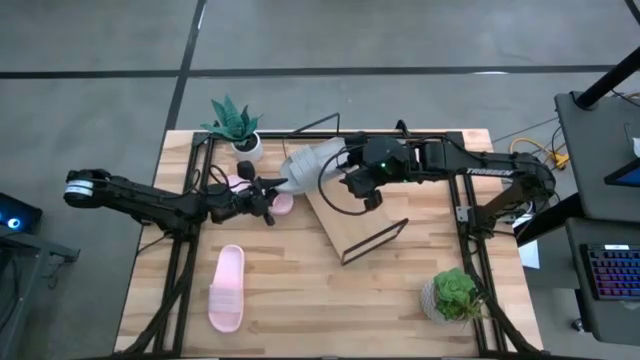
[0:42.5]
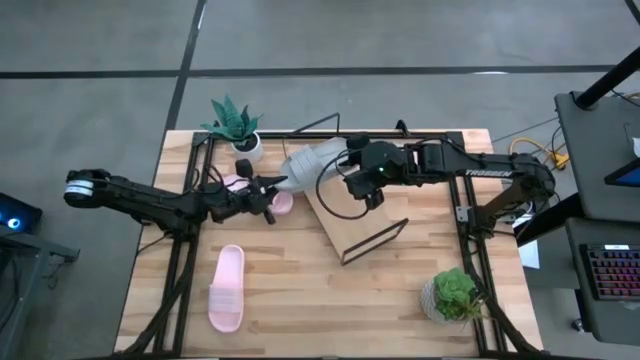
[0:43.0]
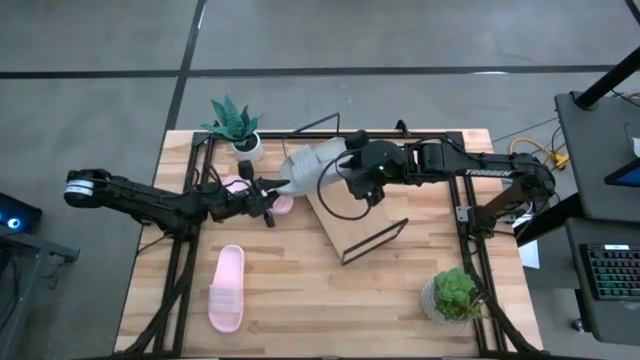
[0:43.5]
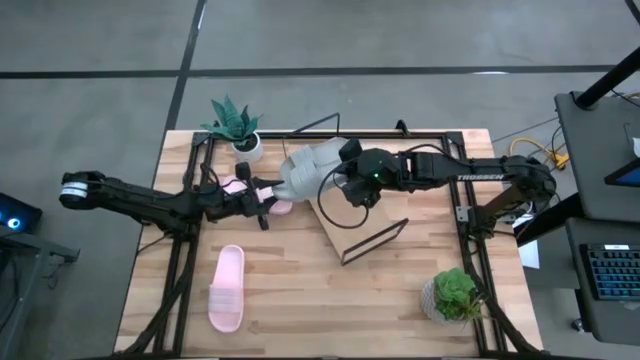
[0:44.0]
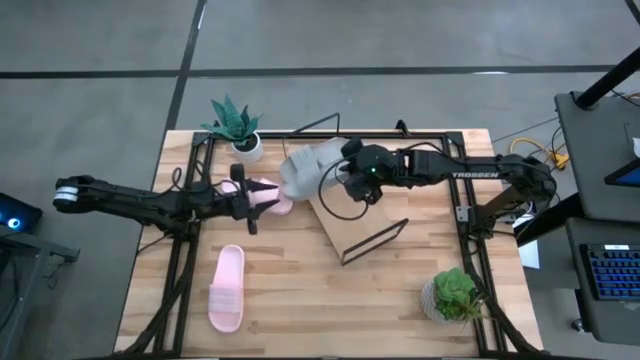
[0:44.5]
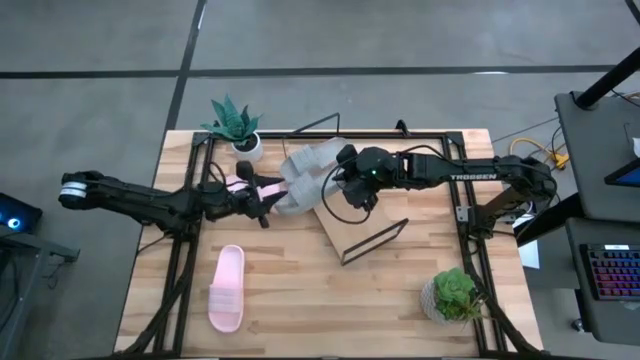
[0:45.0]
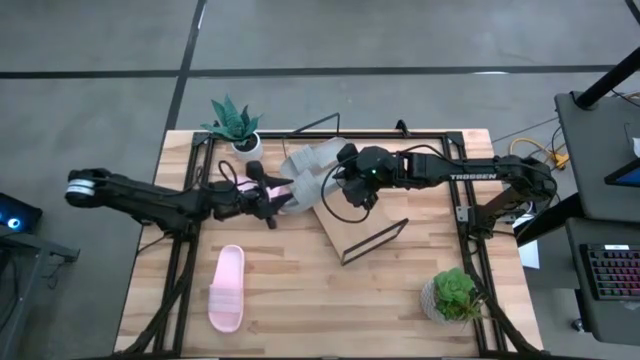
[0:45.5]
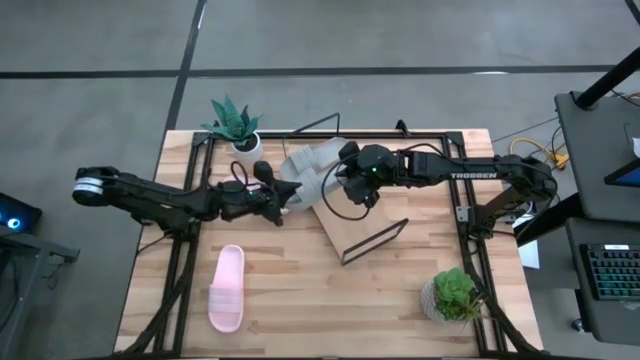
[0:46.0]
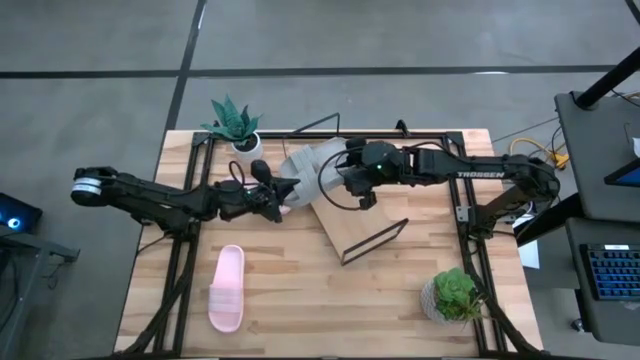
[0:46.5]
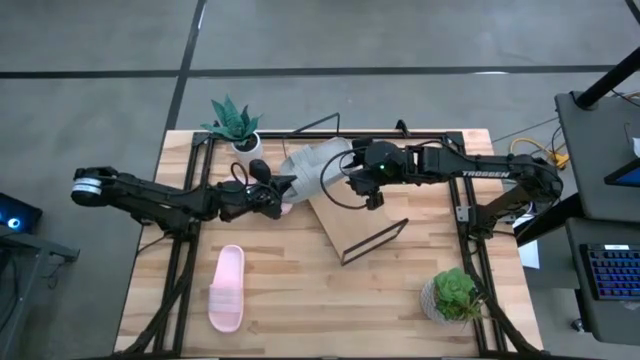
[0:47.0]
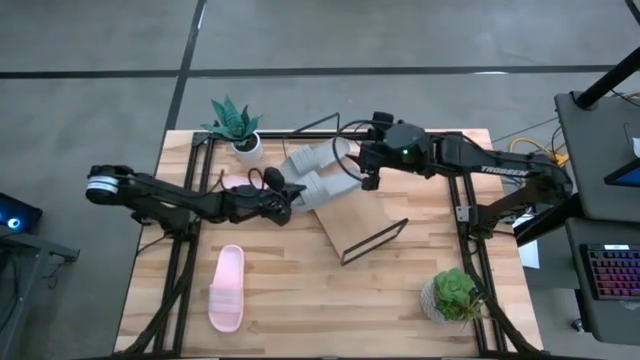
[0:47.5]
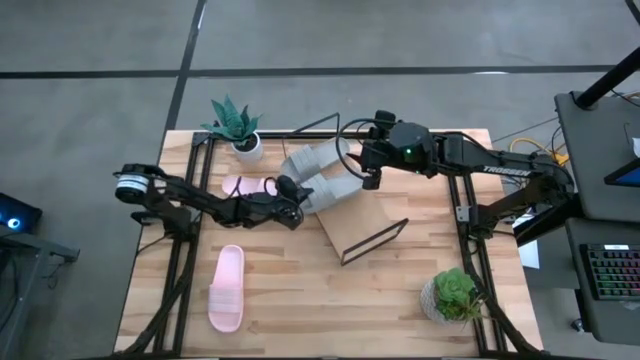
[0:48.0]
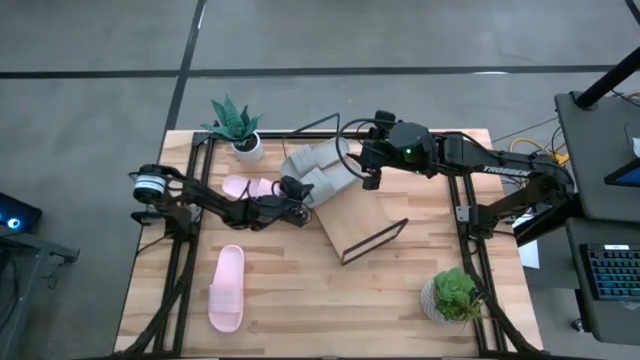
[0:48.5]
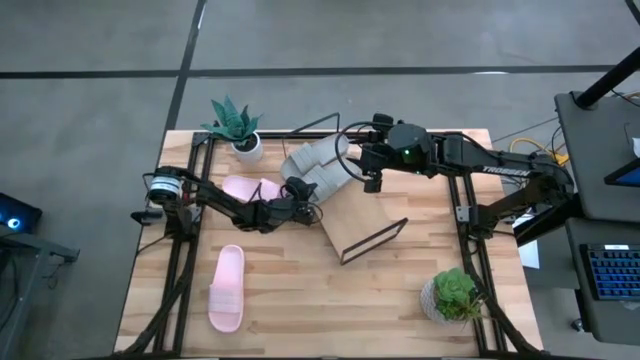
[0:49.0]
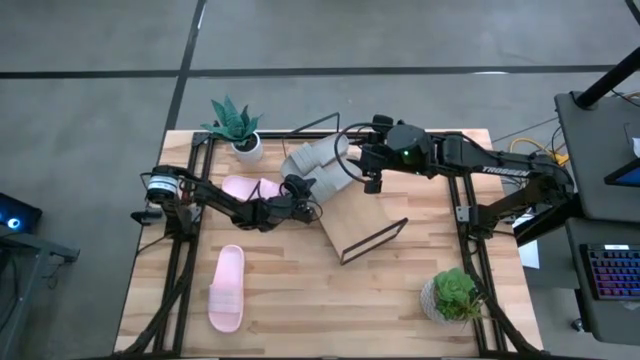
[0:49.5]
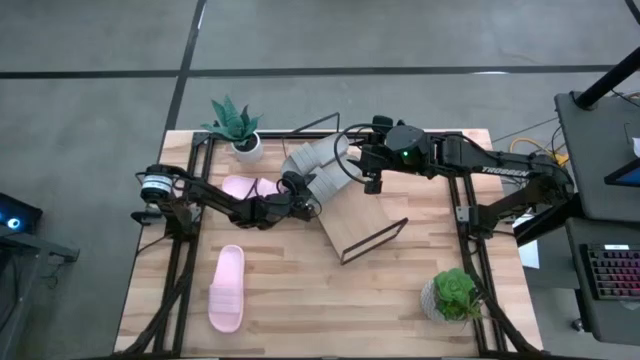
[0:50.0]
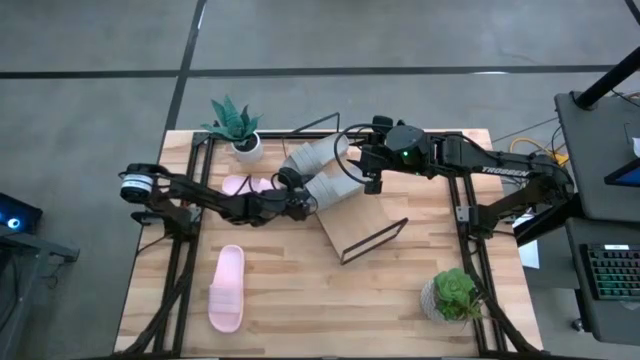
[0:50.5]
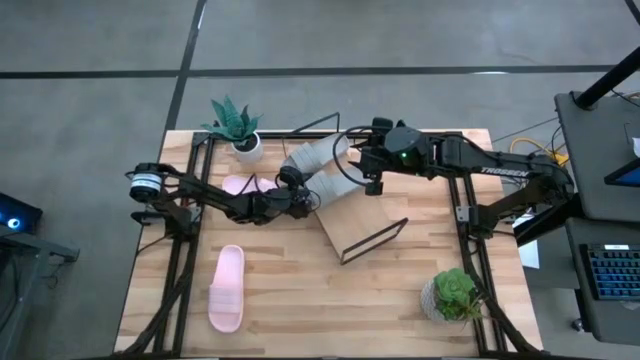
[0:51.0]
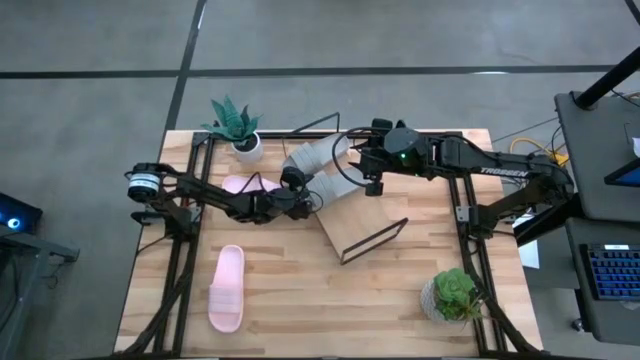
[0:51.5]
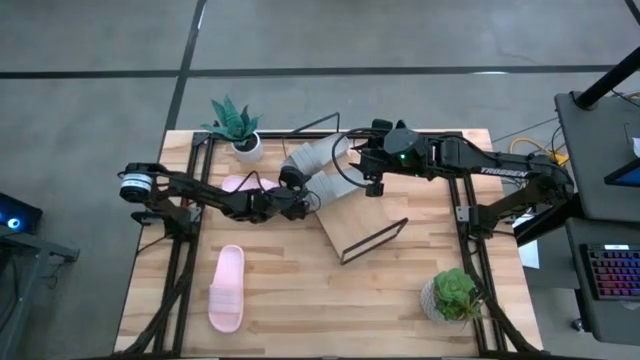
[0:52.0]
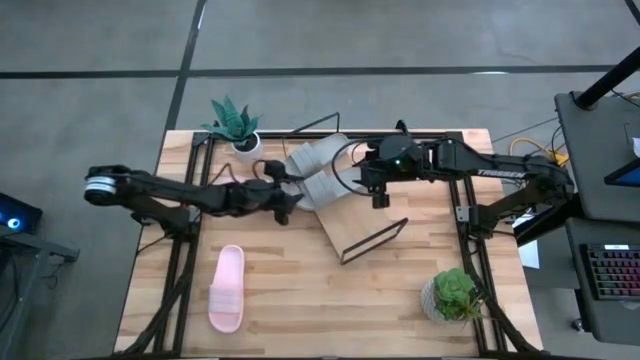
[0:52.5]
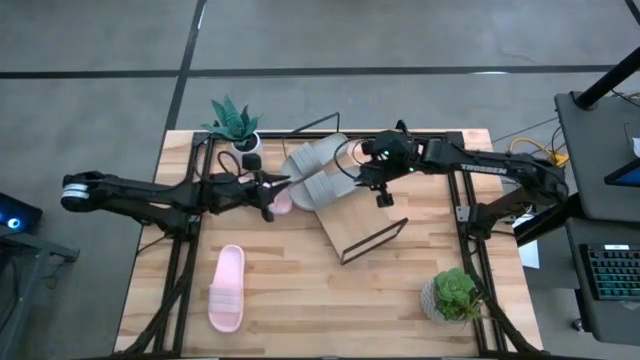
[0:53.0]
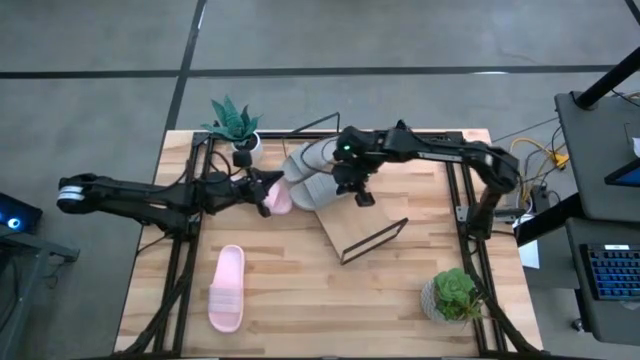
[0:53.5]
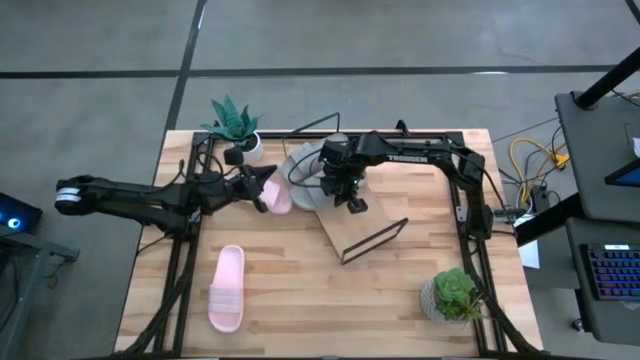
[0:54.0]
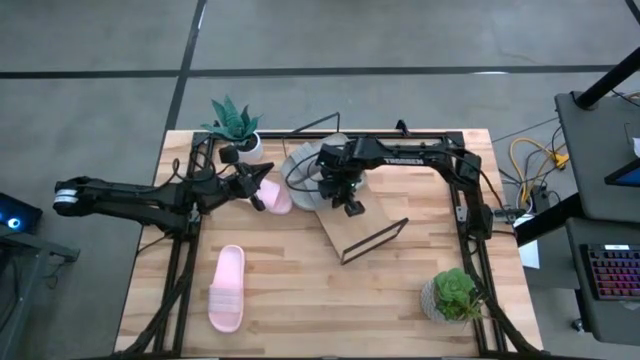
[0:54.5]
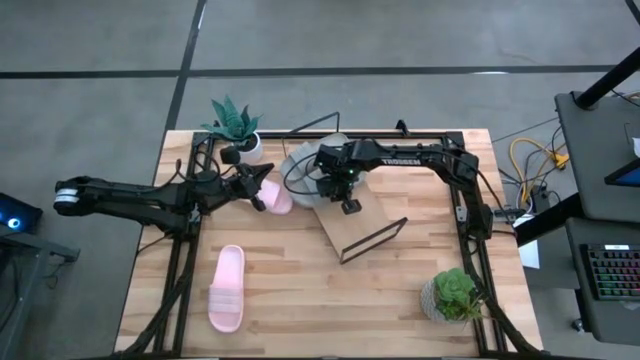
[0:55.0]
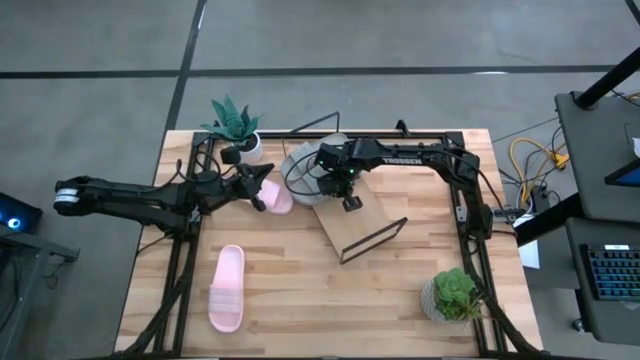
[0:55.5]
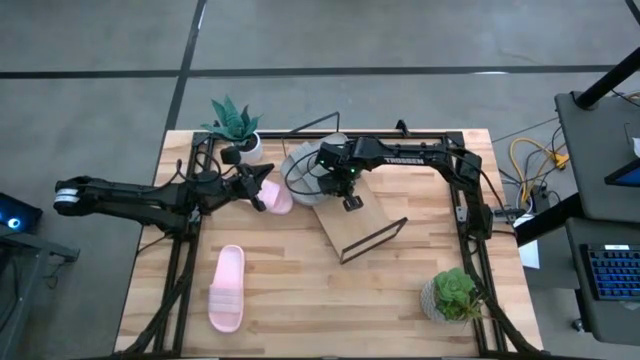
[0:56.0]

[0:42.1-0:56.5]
Task: Pick and place slides into the shelf
Put the gray slide on the shelf

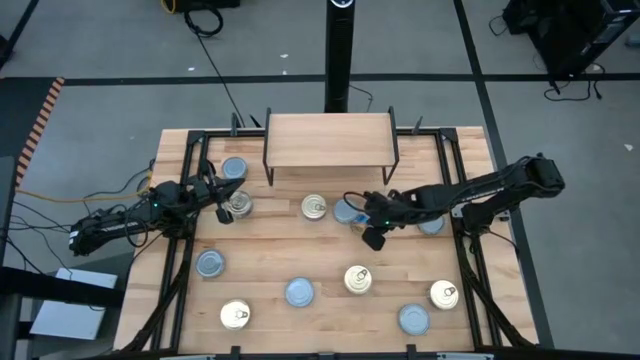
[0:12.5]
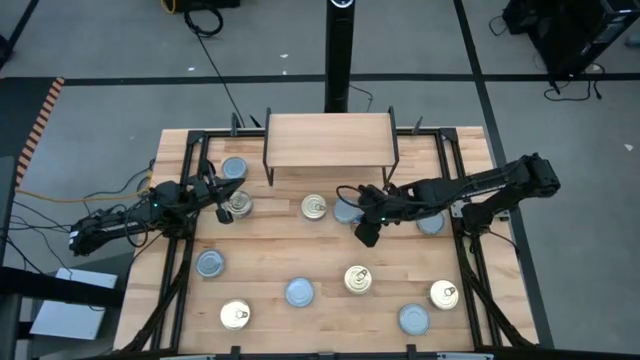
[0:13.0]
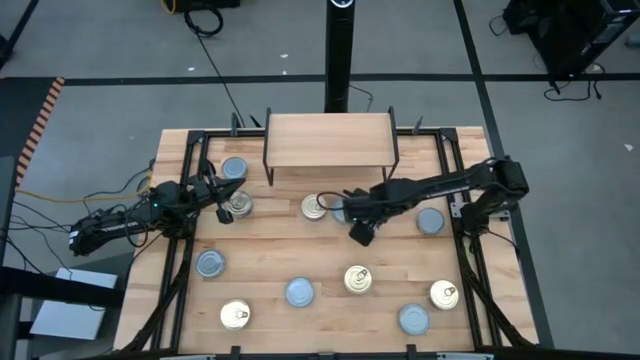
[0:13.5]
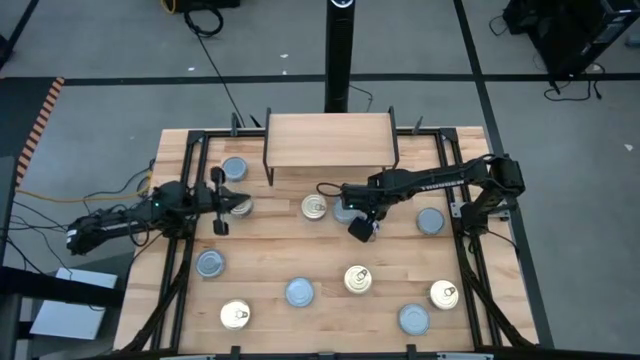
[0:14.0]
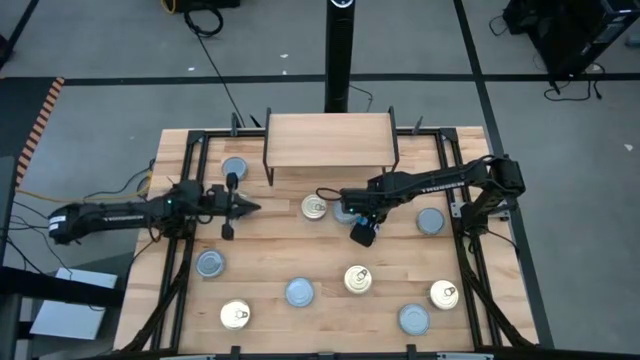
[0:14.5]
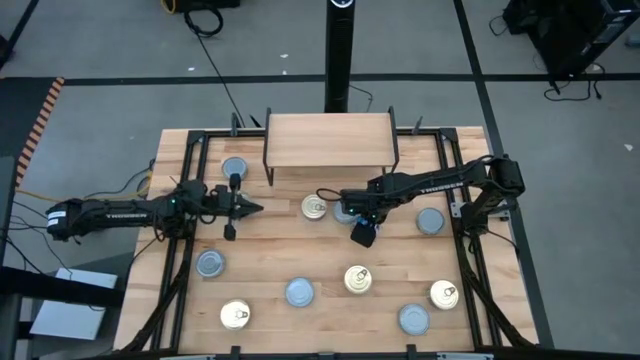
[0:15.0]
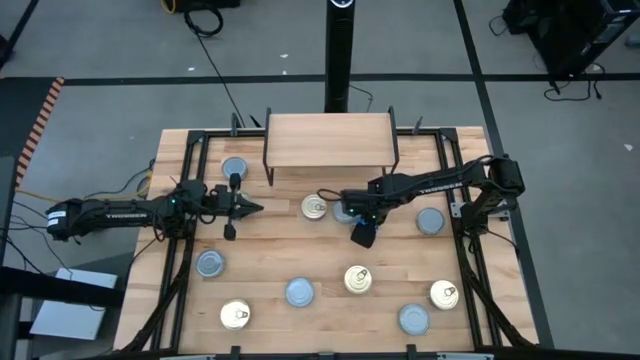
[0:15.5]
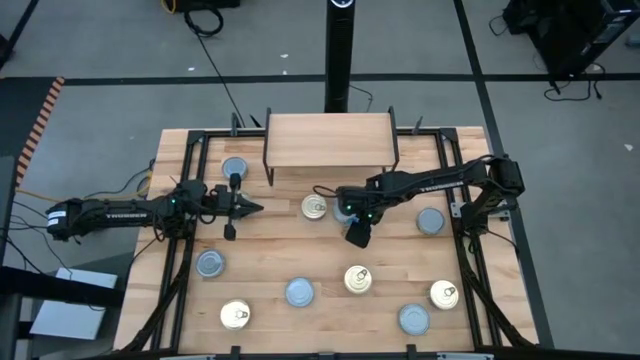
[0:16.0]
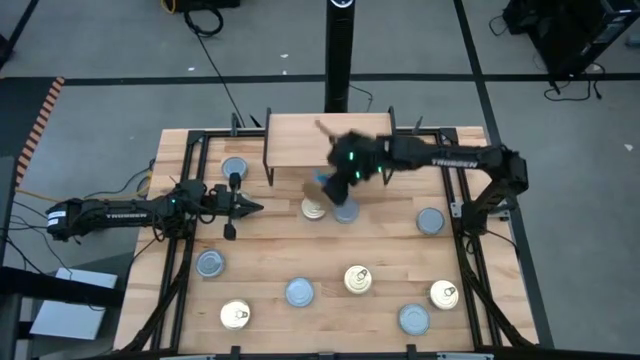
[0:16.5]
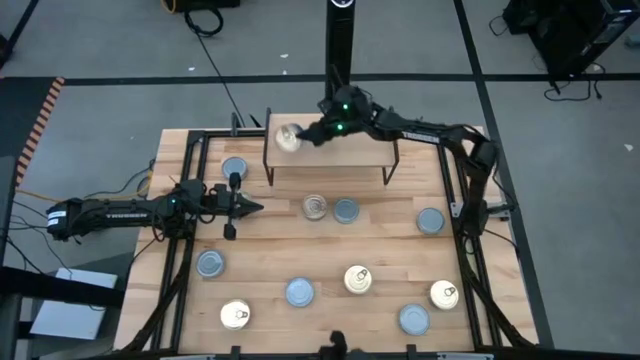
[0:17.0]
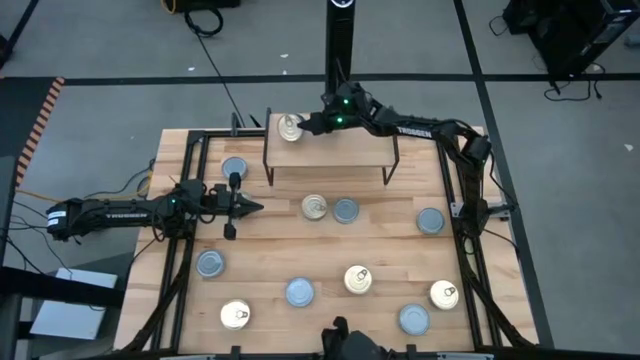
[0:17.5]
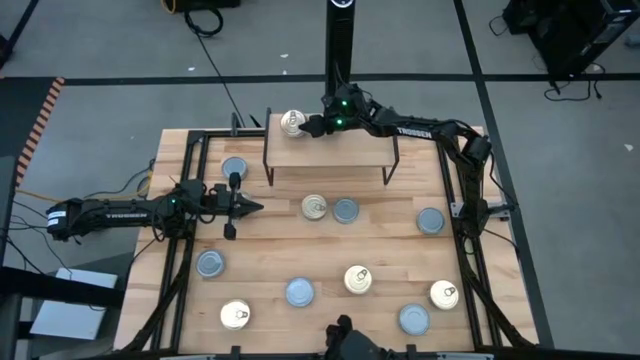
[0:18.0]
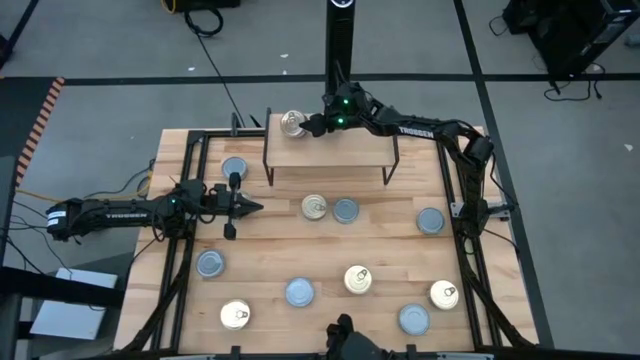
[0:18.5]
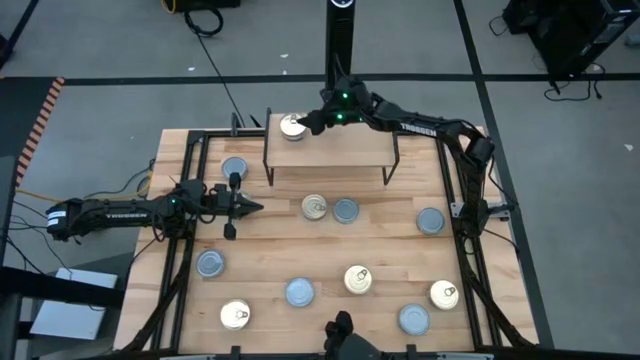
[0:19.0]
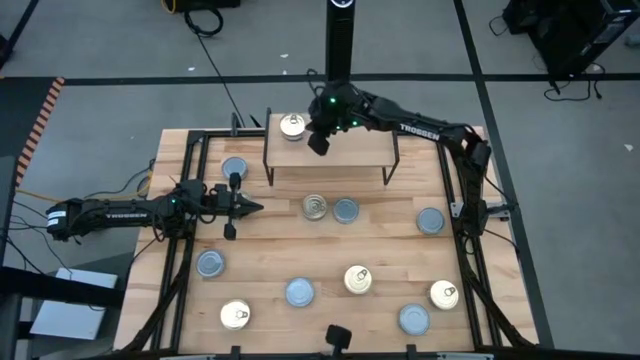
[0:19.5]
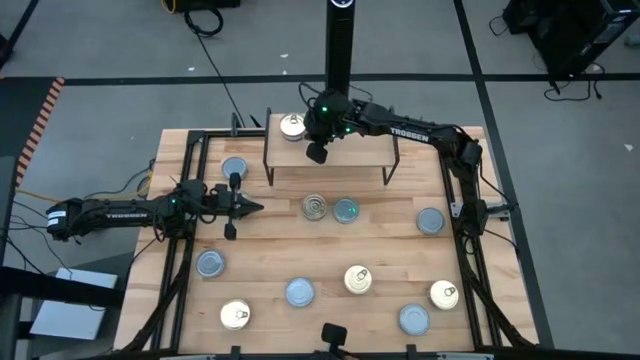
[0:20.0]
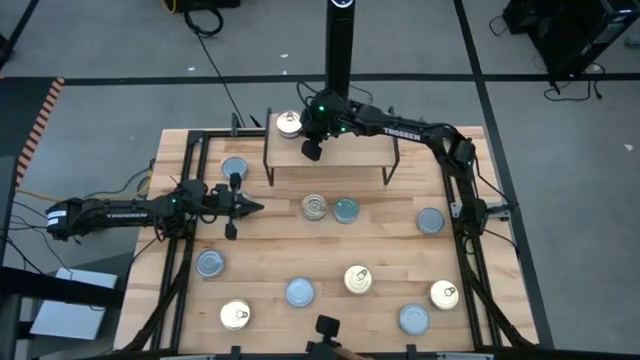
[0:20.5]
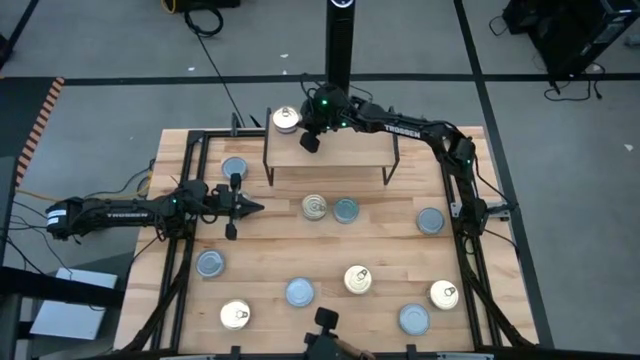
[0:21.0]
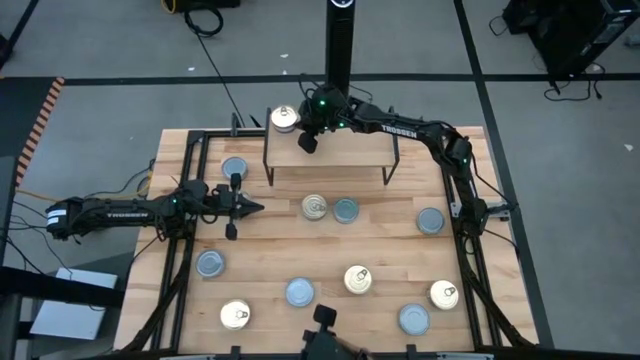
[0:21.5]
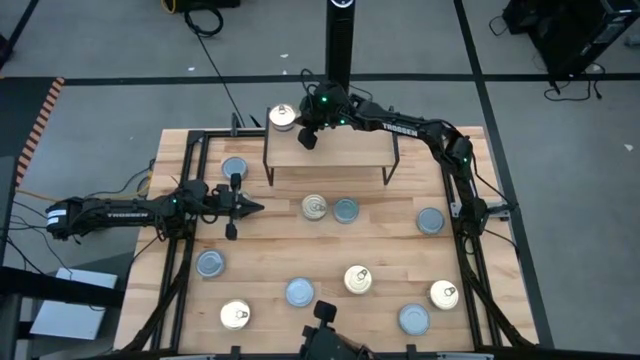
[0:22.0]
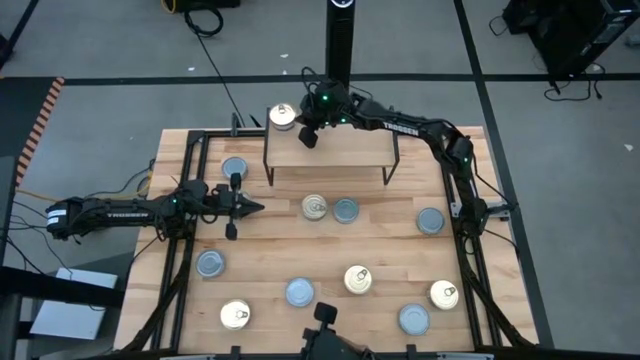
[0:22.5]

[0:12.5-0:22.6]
Task: Stack canned seafood by type on shelf
Put the blue pink tuna can on the shelf
